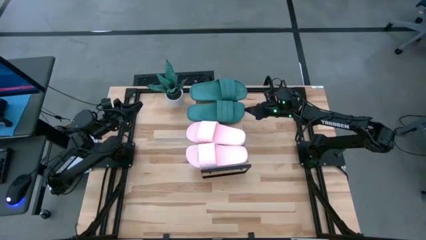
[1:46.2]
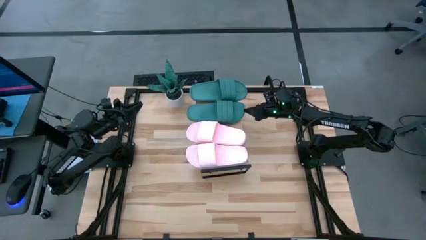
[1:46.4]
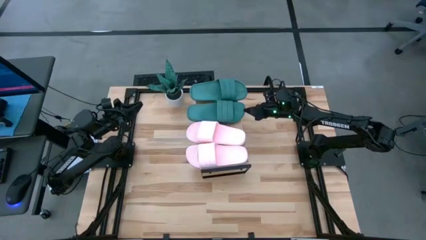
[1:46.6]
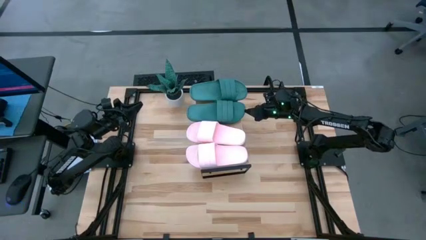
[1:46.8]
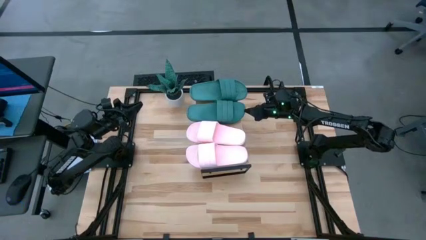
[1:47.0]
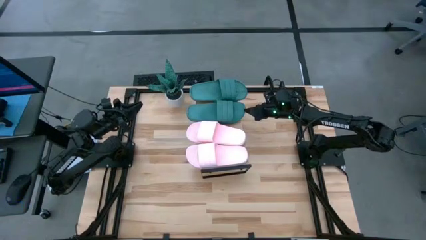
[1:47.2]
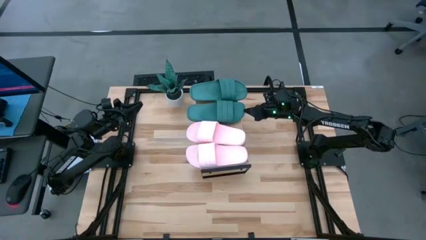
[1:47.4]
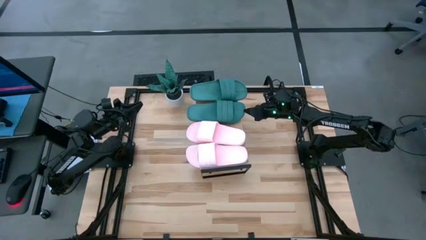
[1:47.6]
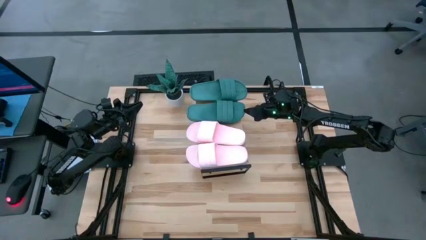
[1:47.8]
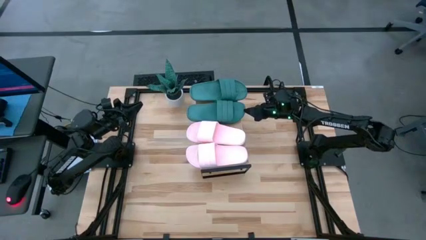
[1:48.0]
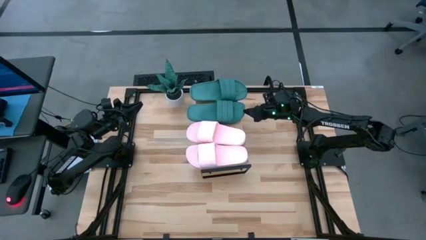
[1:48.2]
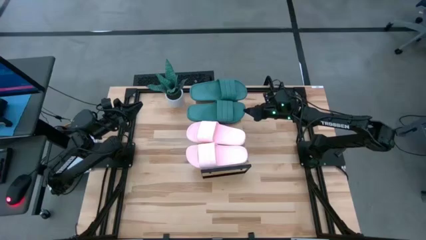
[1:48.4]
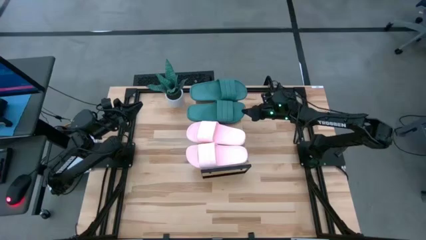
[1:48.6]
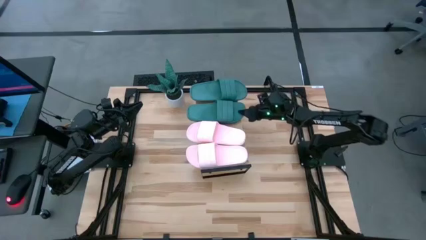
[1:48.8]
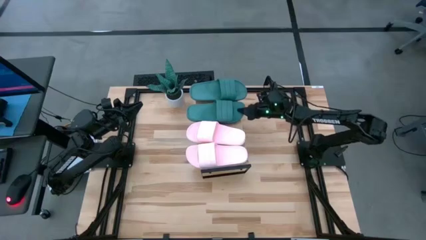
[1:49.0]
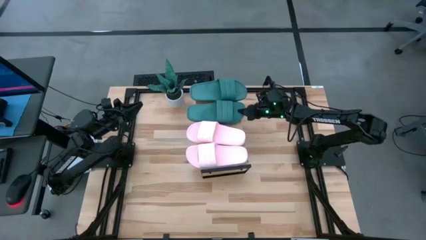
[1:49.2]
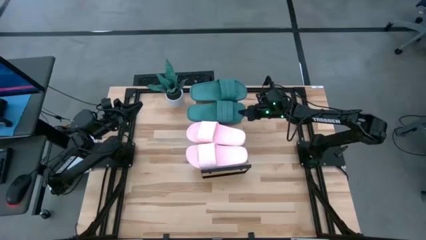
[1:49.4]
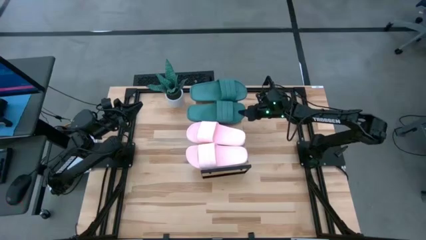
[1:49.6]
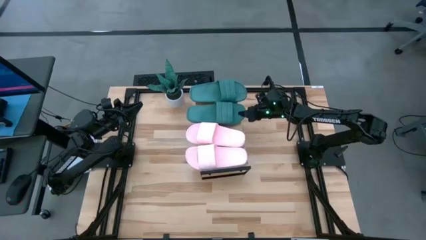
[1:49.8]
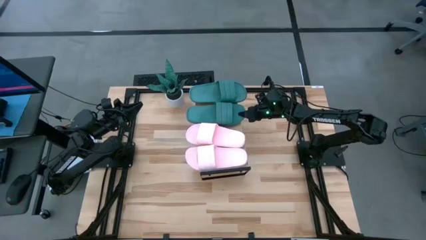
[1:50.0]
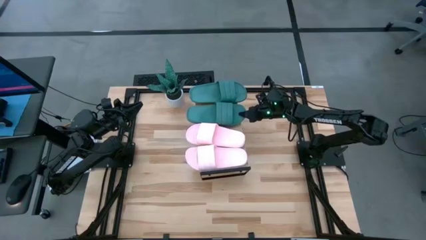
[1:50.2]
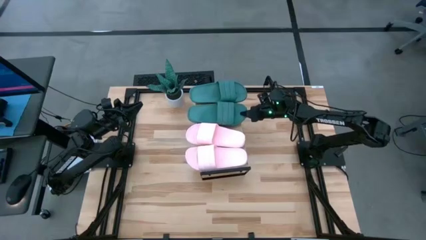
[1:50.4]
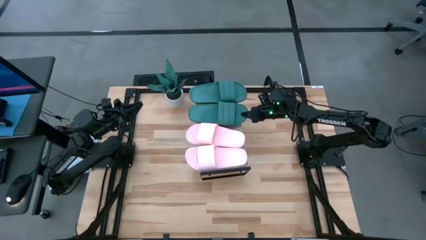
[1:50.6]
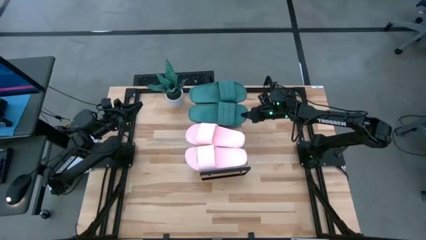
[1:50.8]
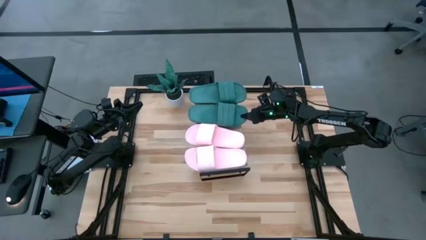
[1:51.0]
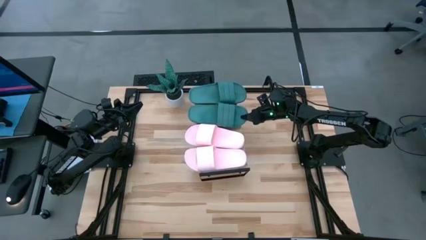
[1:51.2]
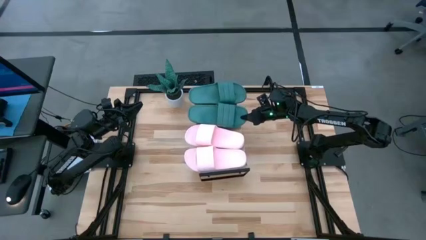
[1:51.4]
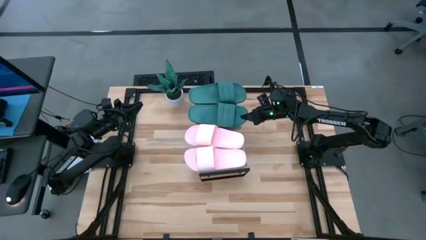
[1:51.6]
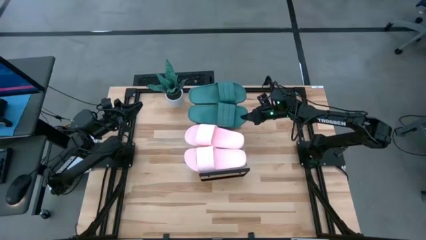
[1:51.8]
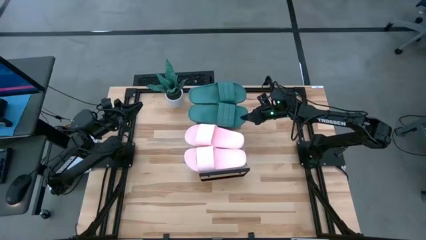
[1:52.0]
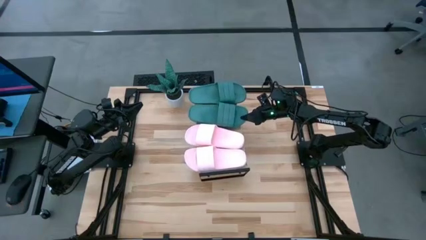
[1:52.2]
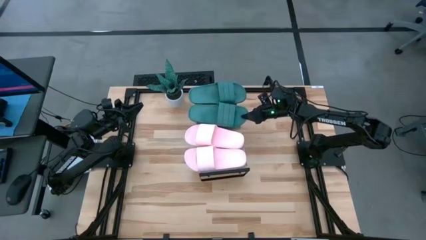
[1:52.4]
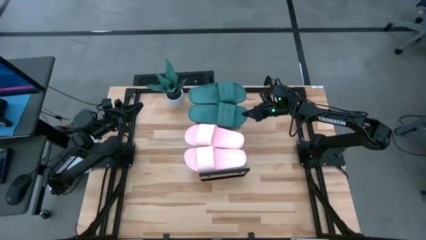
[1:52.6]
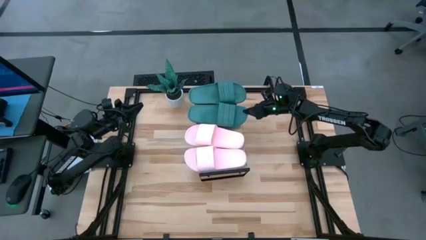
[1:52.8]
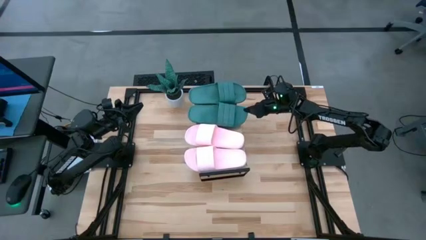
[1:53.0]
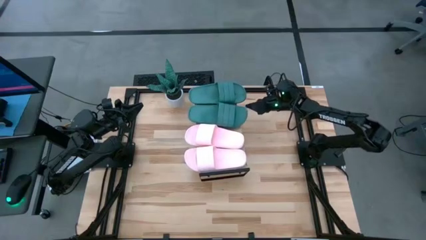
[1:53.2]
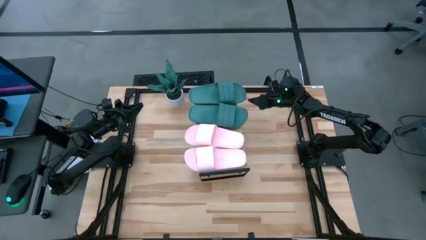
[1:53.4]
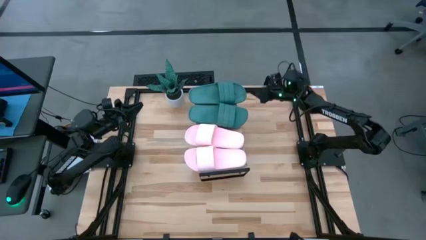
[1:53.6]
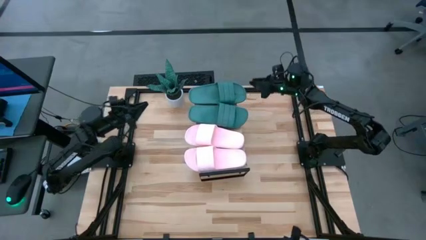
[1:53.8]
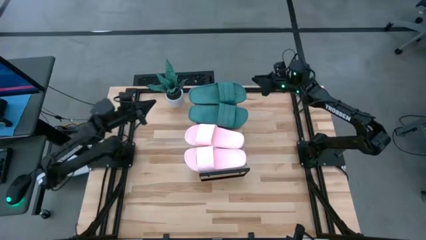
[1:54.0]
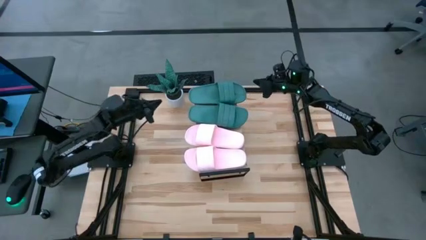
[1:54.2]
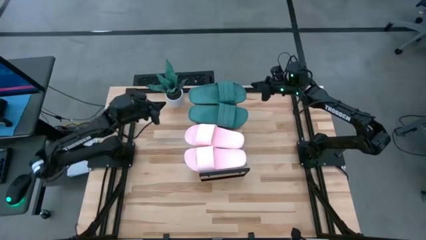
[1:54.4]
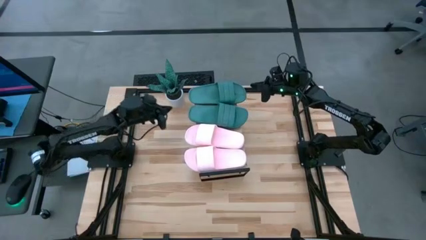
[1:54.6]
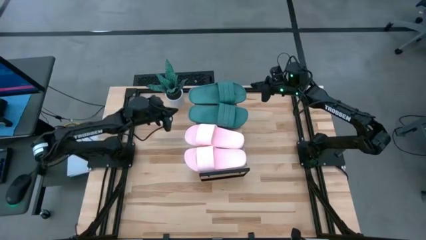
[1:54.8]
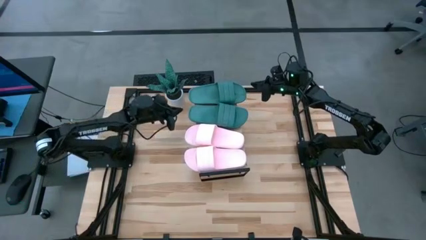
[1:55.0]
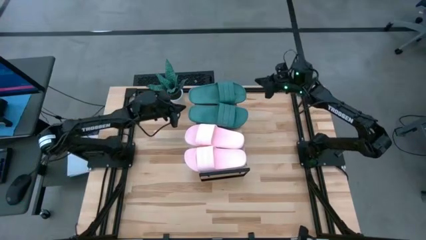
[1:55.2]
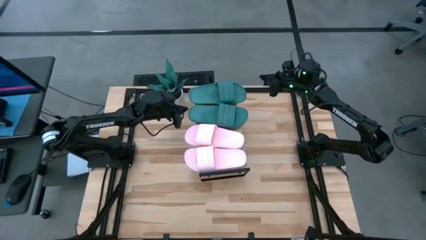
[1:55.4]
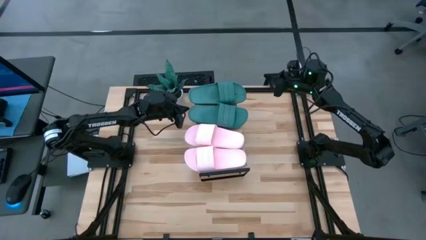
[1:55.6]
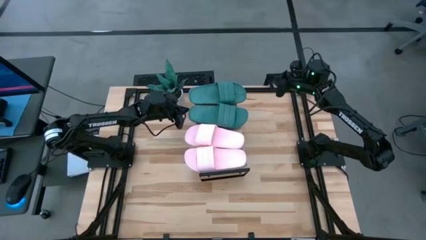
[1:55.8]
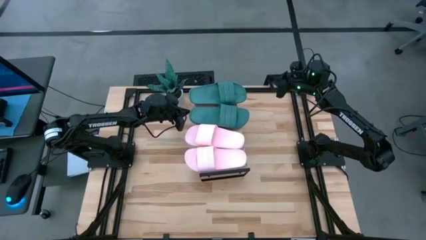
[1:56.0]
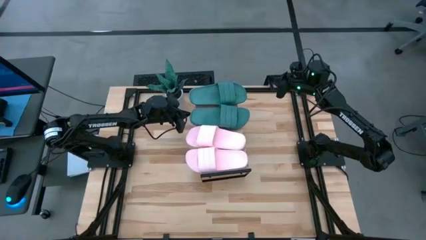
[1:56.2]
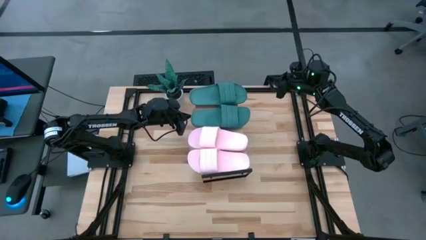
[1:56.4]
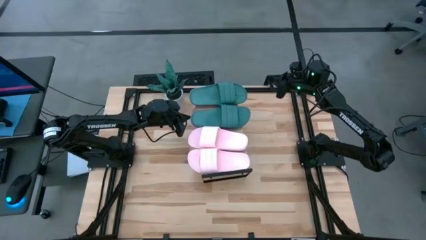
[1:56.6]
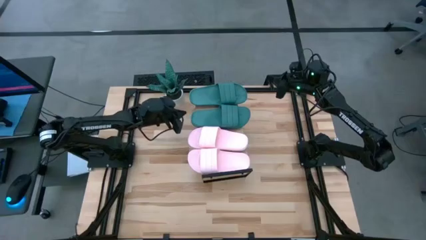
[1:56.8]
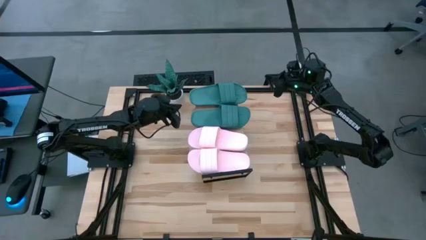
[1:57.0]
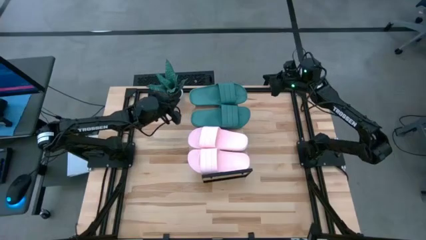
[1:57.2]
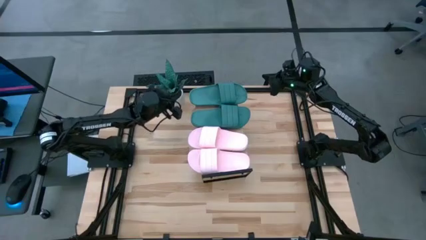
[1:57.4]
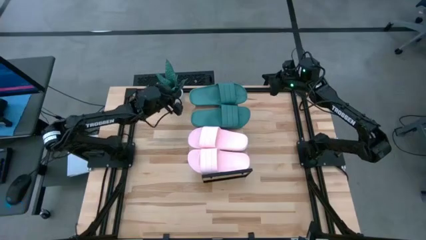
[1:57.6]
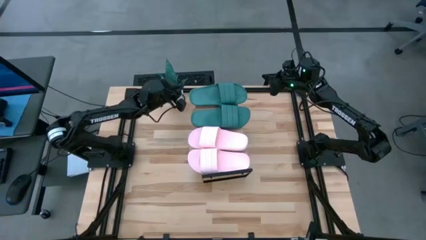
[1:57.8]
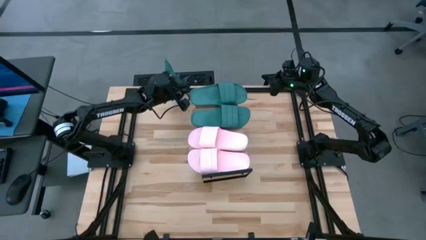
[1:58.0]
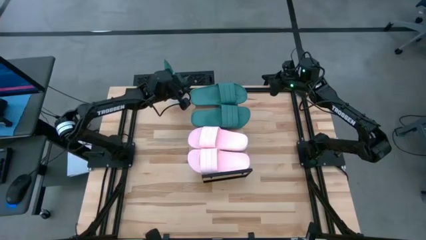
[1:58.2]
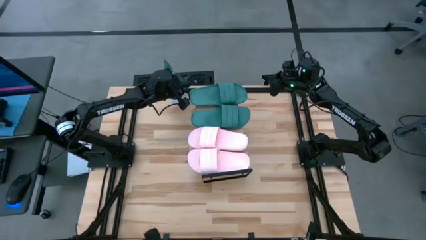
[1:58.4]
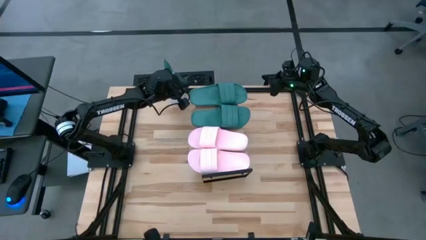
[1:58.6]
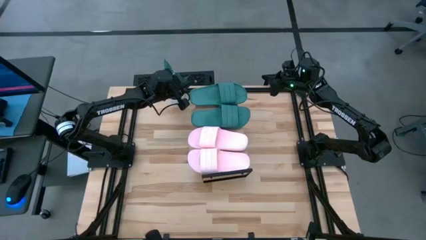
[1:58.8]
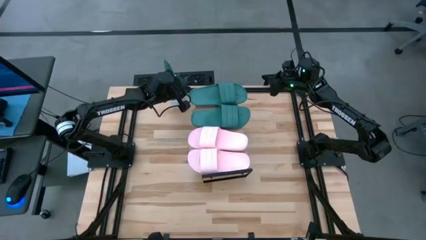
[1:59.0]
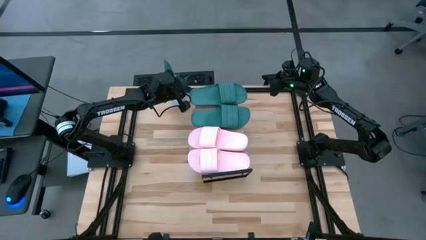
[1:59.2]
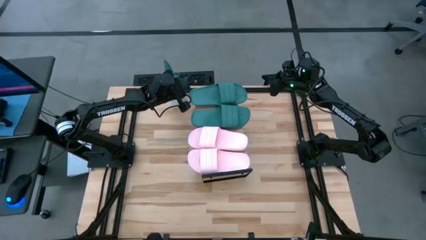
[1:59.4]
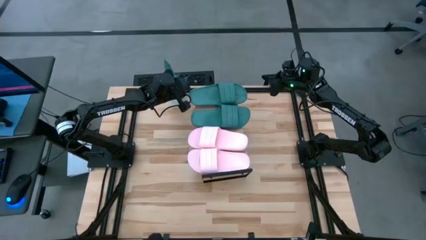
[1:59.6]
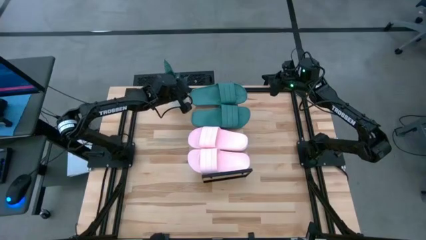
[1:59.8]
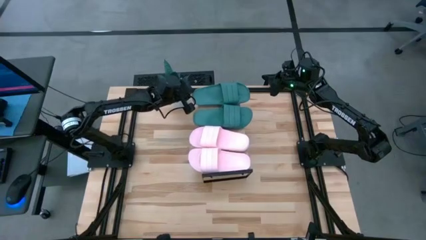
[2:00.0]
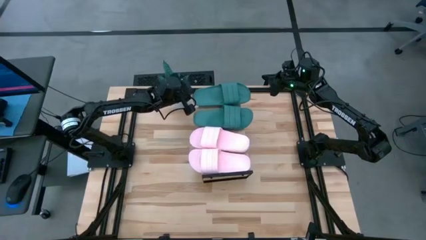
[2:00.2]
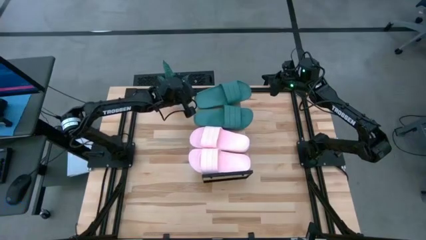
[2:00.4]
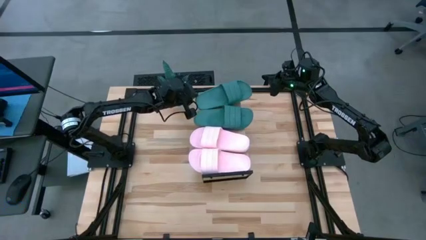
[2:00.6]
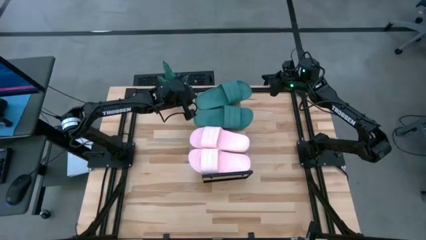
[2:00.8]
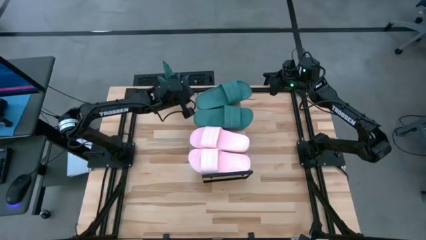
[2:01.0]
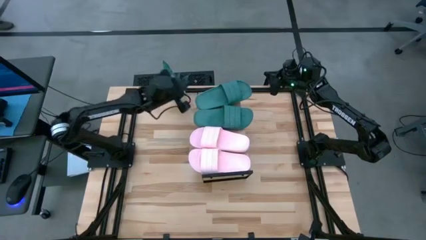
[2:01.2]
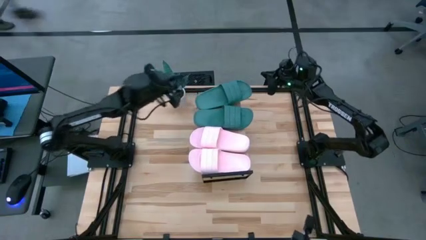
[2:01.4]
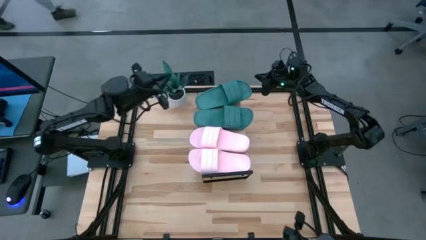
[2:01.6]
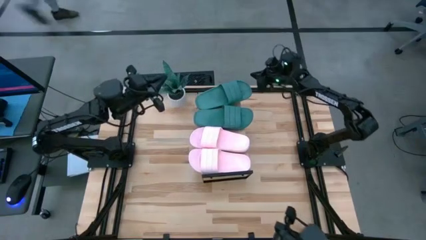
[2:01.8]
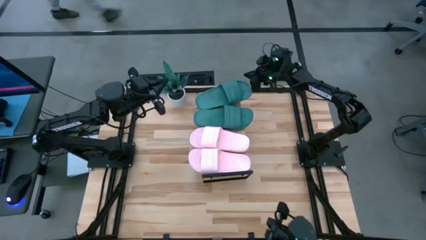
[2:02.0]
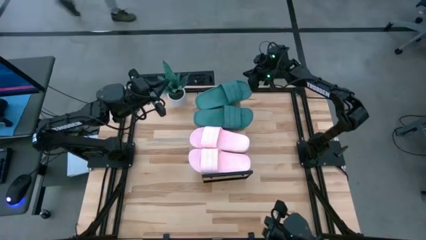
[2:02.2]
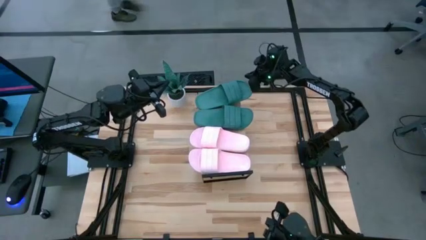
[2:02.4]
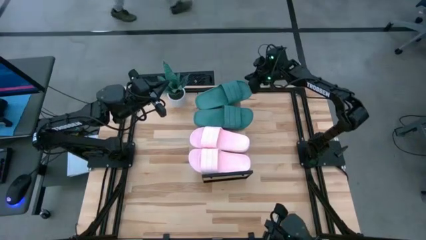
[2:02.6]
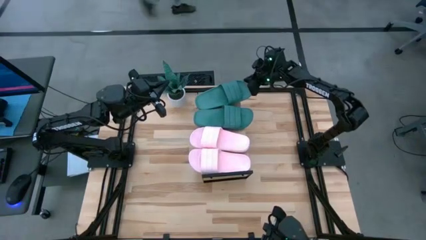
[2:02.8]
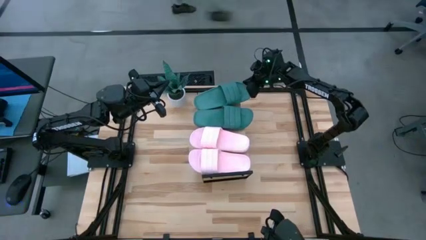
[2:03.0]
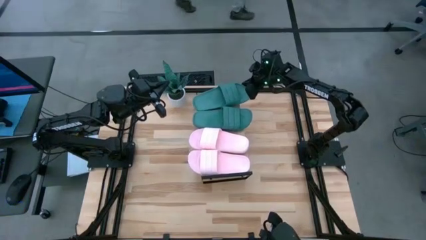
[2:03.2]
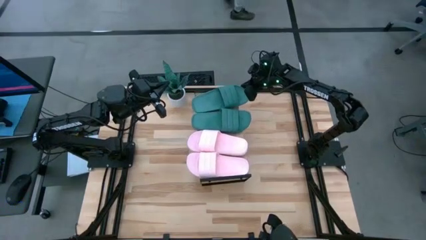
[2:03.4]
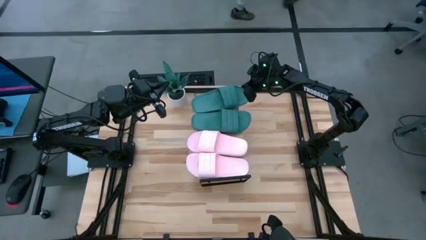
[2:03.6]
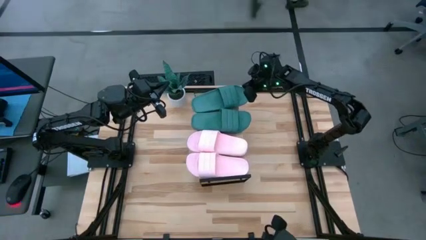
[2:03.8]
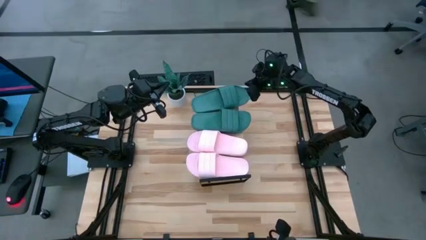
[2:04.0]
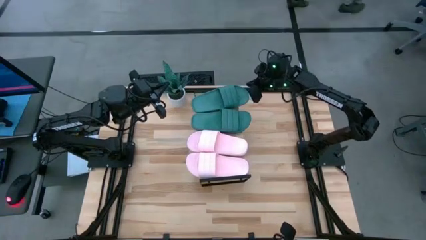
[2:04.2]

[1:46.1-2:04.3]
Task: Pick and place slides into the shelf
Adjust the slippers on the shelf
